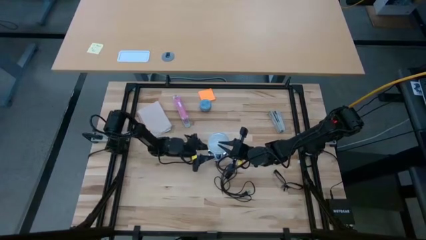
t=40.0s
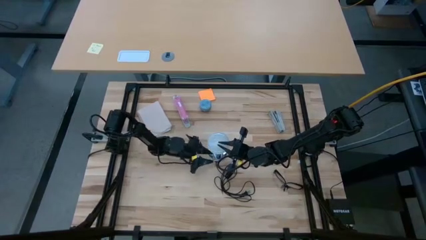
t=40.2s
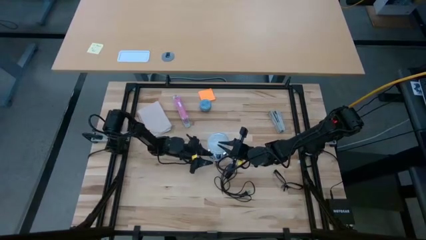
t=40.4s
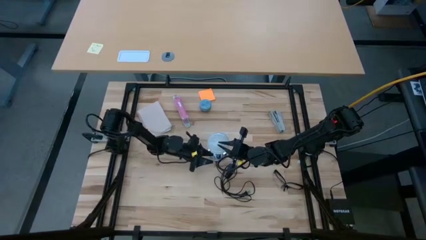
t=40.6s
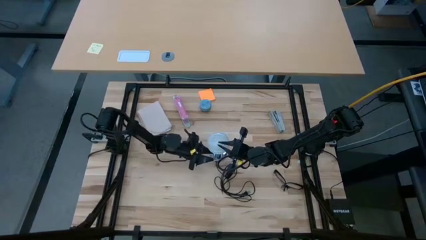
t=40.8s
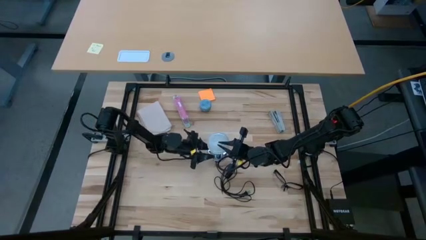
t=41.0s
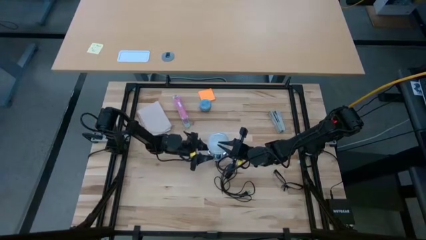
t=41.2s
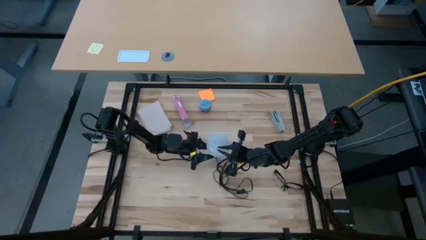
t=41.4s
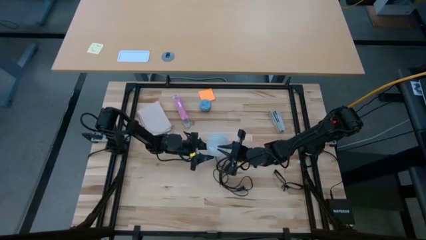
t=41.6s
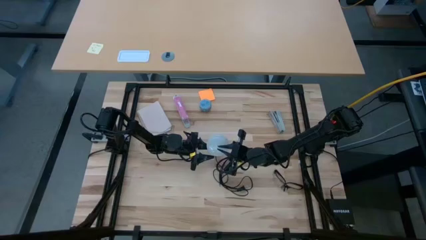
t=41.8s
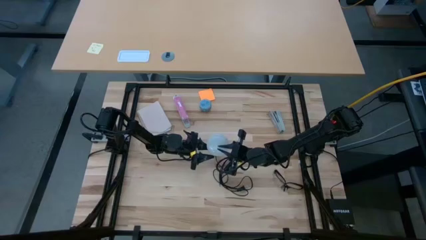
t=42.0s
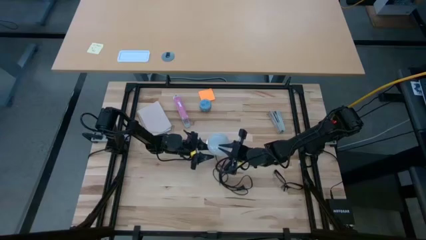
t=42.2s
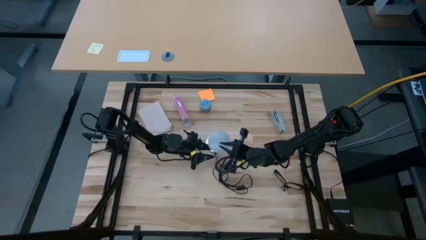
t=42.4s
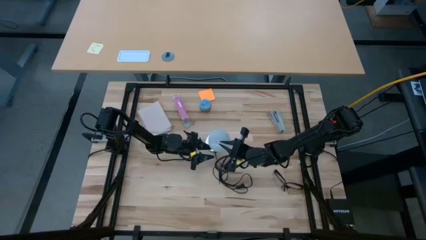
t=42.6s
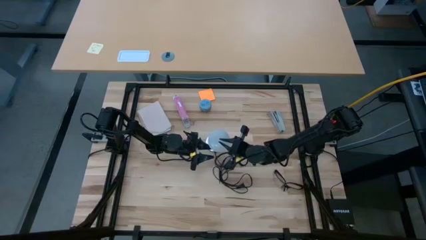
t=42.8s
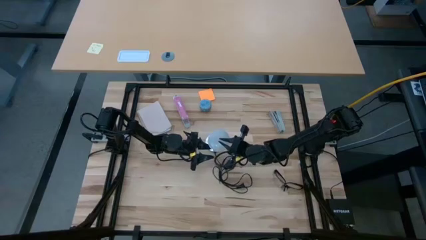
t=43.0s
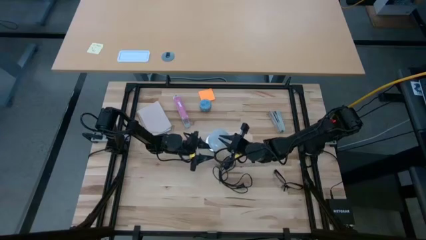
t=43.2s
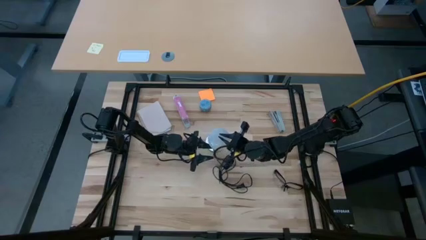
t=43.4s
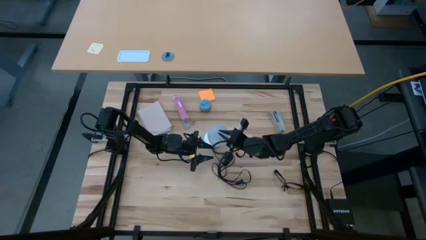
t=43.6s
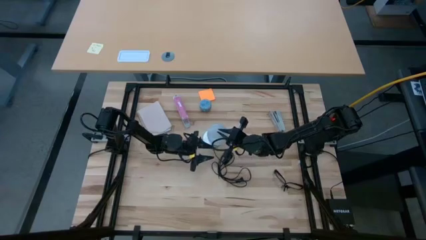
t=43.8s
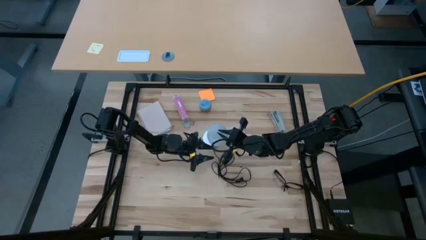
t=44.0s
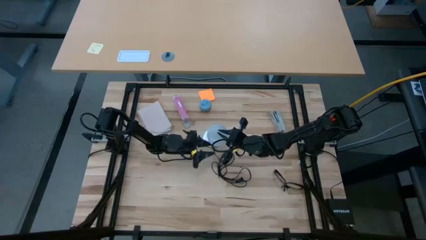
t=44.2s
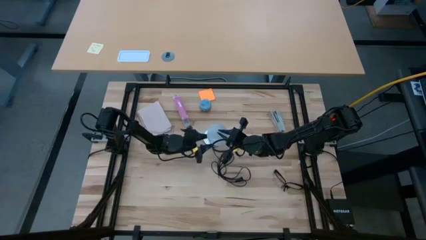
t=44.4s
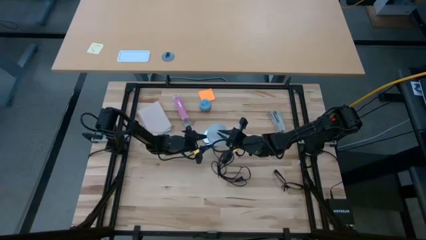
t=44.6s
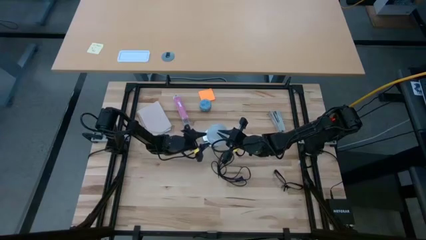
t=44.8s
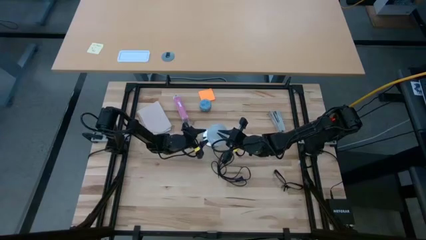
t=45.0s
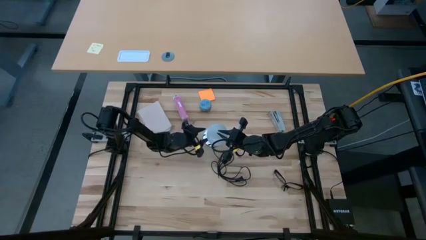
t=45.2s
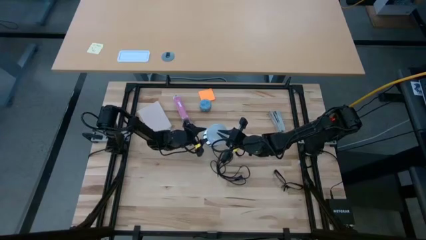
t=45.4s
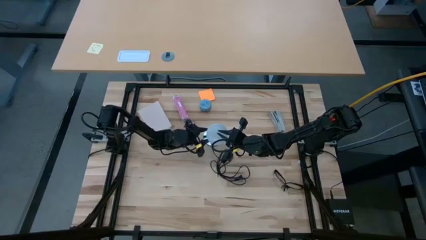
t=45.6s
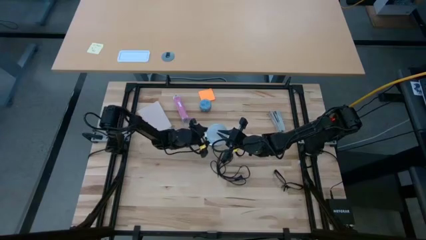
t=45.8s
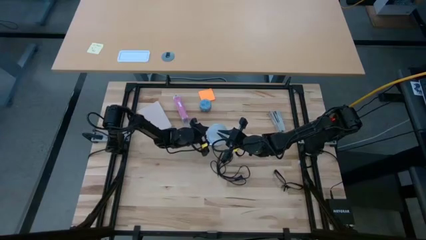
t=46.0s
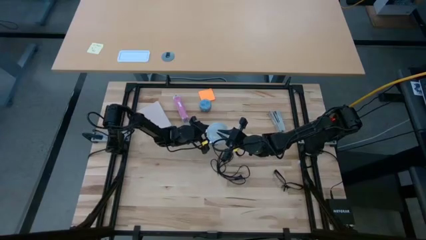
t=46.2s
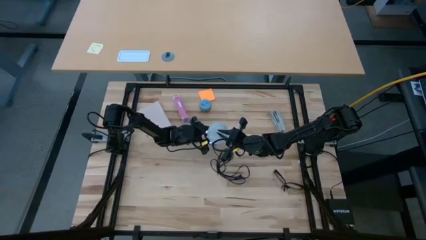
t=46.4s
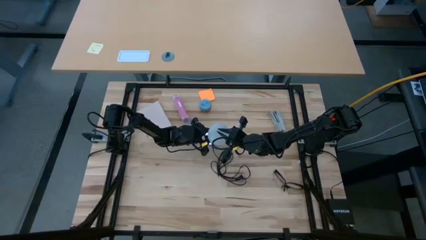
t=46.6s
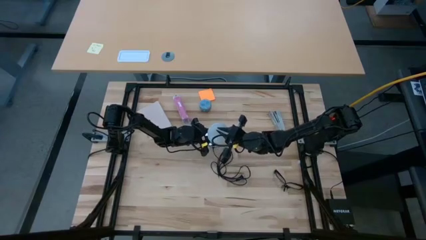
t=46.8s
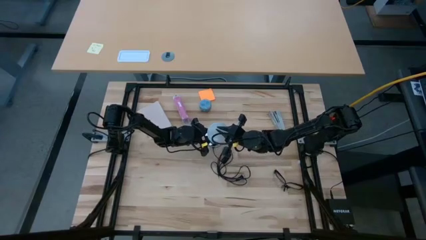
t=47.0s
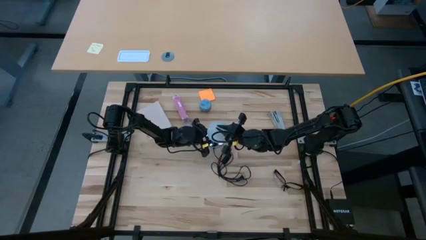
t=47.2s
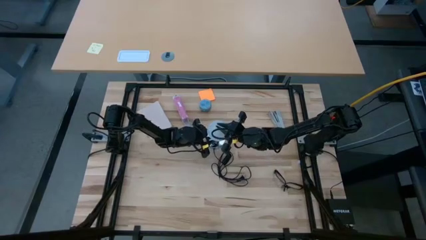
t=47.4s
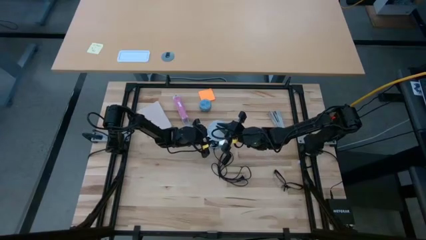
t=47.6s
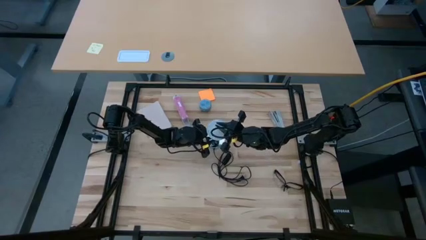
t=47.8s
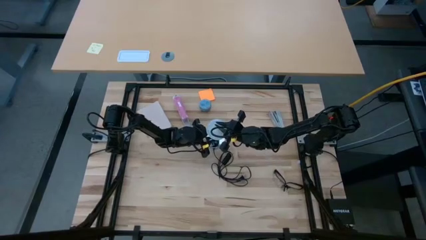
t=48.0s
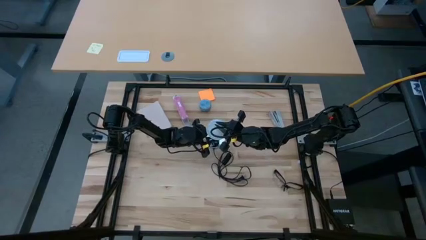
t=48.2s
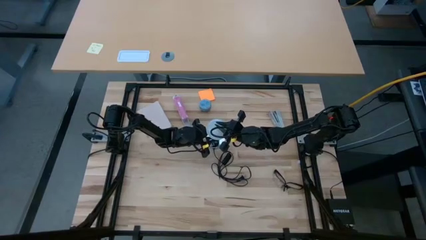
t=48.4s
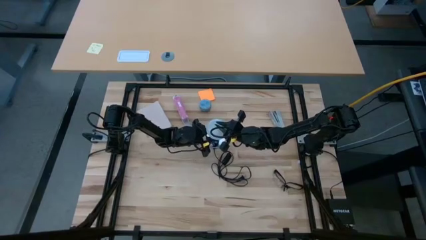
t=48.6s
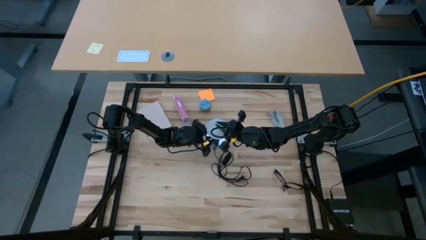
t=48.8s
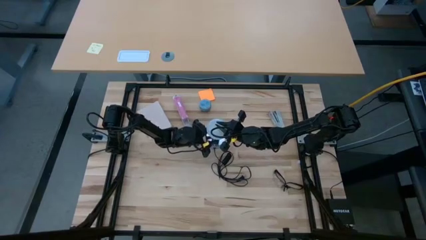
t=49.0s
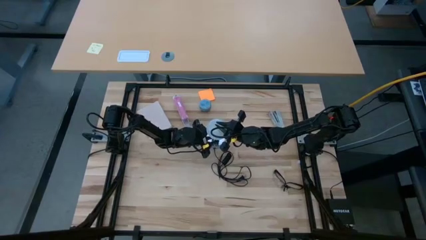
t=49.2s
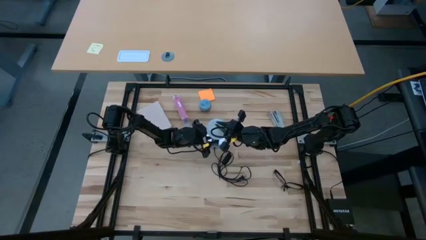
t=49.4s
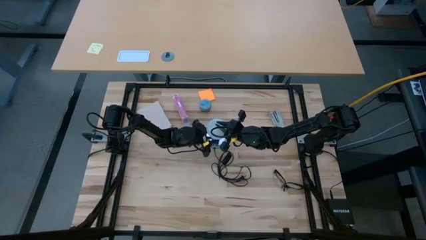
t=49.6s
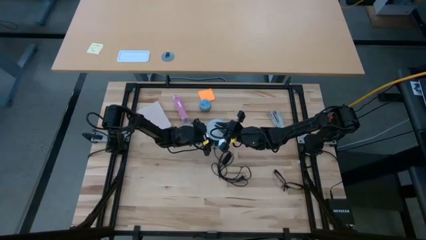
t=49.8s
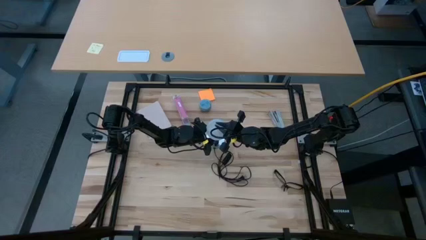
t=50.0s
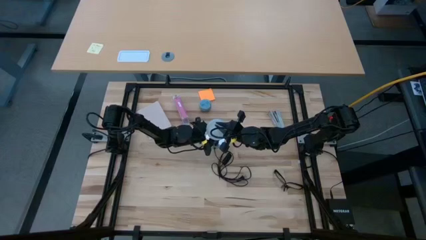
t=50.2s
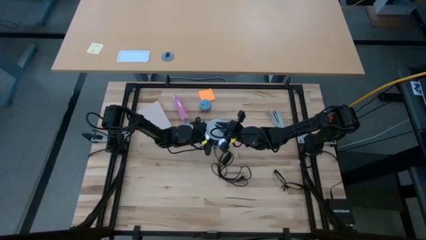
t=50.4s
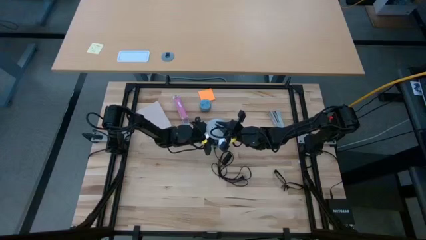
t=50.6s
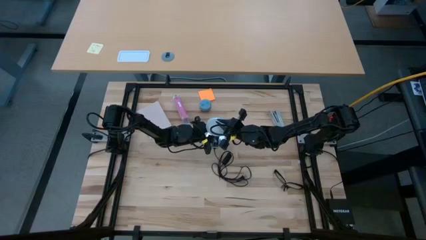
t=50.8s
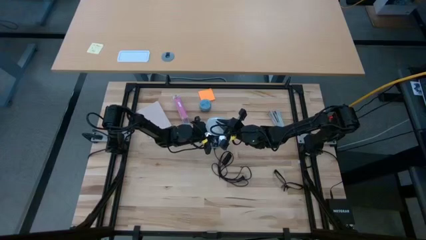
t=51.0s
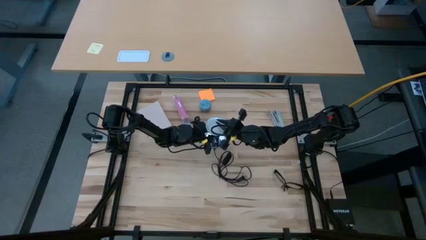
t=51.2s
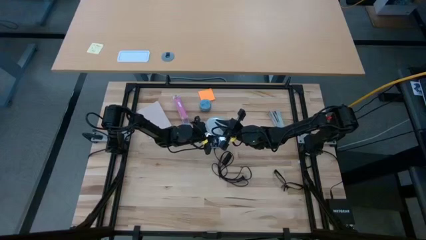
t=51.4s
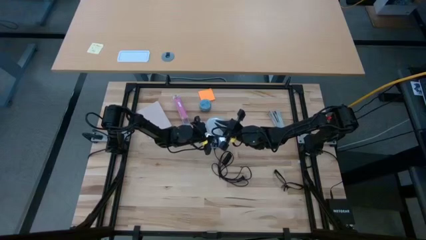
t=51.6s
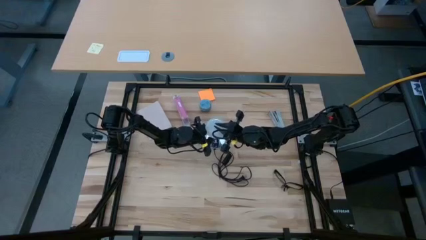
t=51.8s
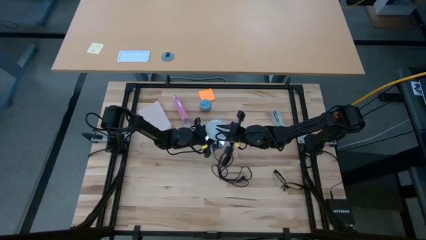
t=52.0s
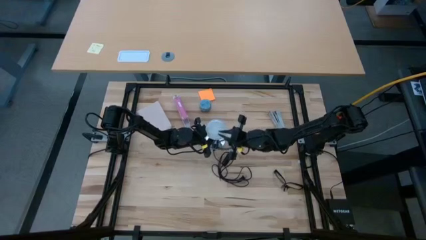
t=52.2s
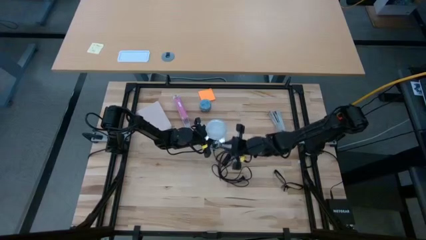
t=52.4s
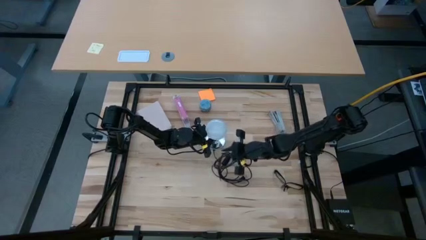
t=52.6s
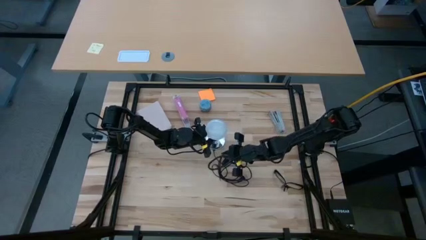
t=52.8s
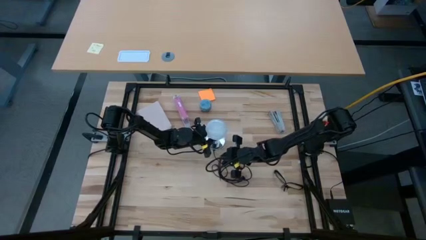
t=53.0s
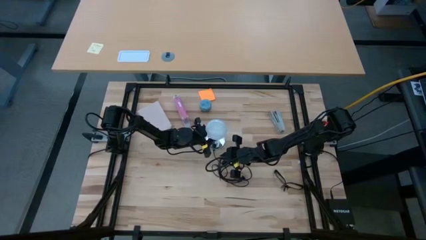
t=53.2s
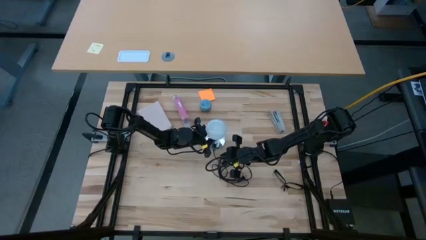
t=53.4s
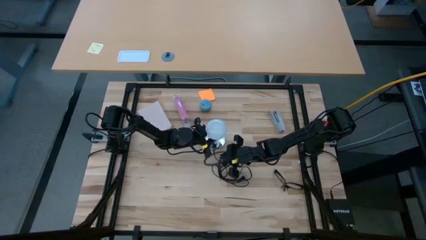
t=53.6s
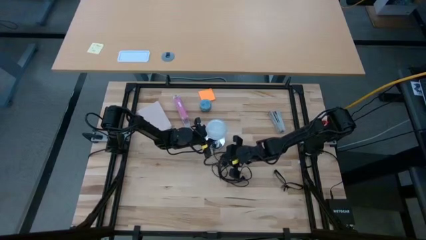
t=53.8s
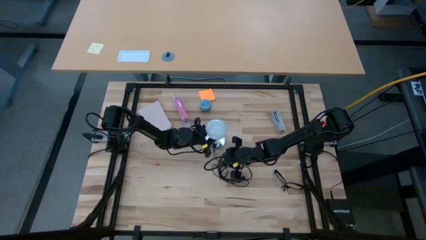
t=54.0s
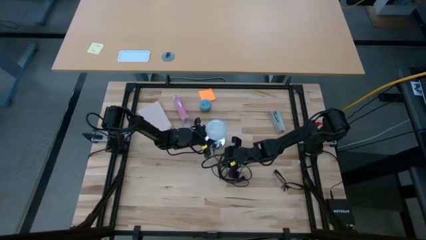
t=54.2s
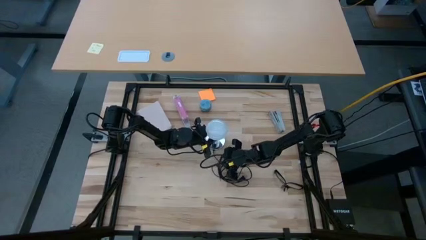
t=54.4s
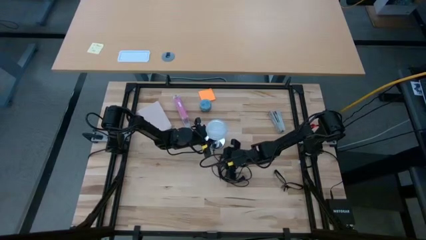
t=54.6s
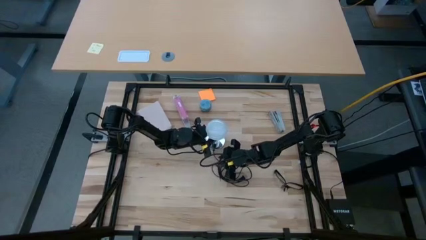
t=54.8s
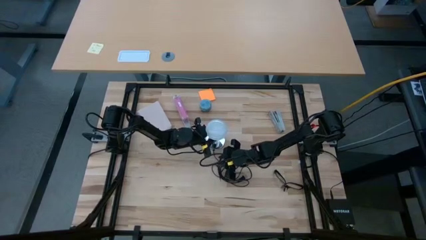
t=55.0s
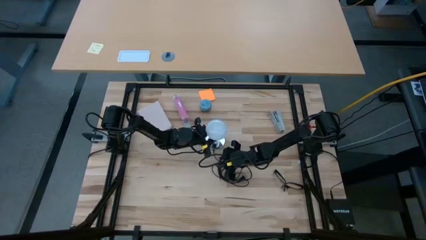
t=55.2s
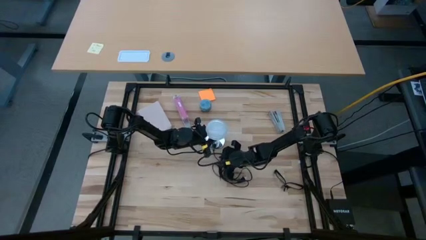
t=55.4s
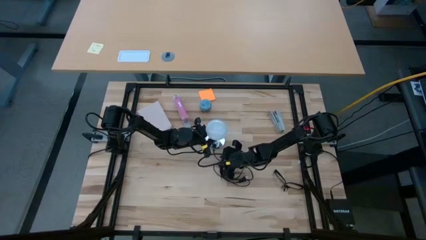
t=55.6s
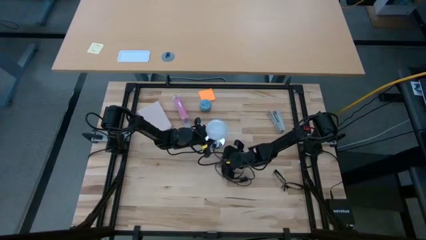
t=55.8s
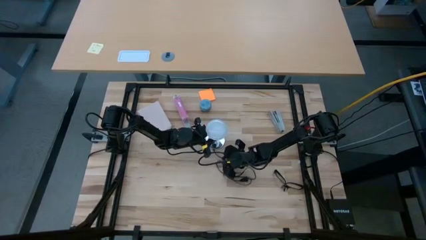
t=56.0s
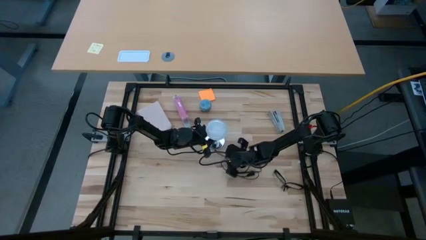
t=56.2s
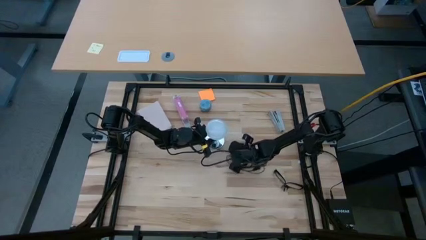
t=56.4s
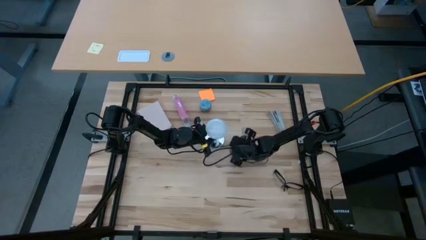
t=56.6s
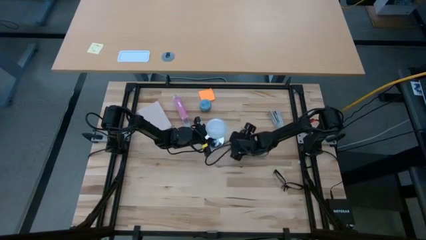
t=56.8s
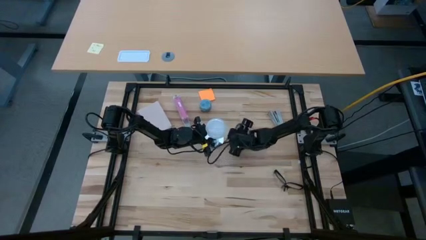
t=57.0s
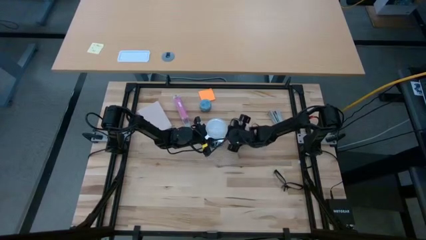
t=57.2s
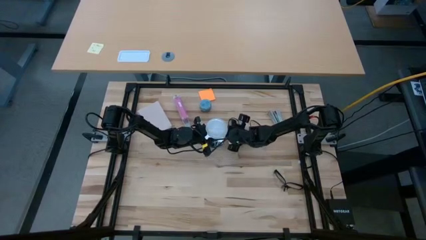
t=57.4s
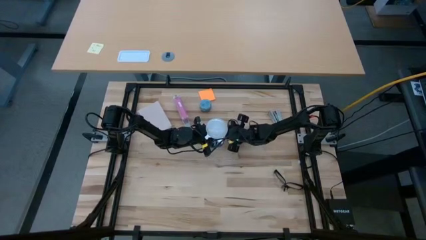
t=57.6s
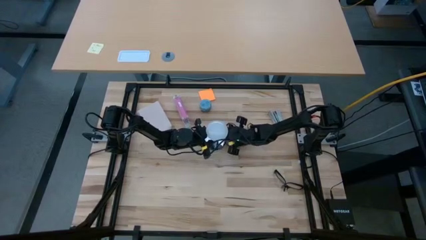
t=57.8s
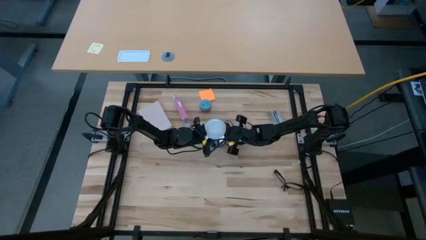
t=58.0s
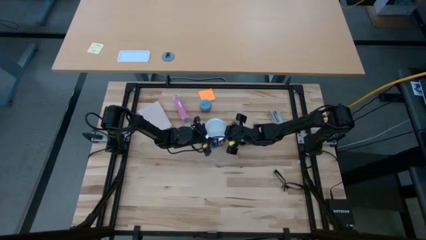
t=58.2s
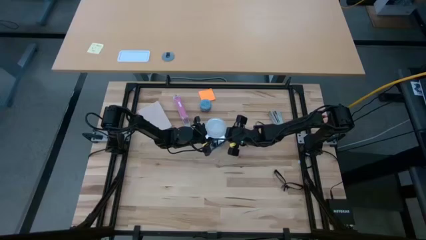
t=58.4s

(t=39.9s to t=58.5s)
Task: Screw lightbulb
Insert the lightbulb into the lamp
